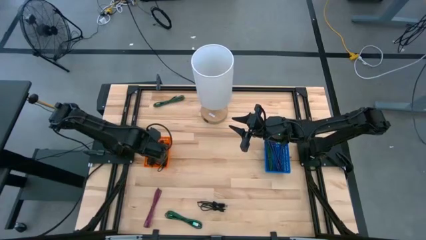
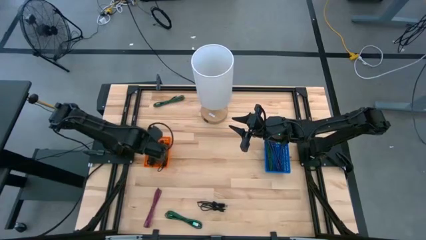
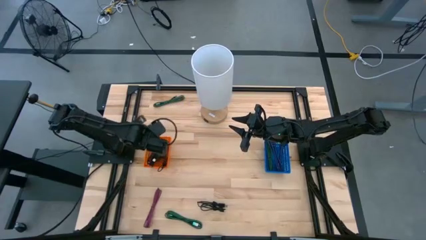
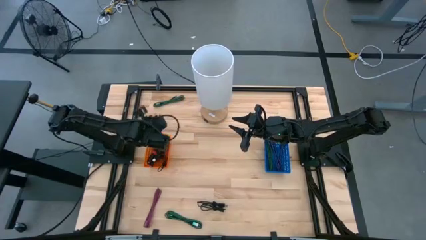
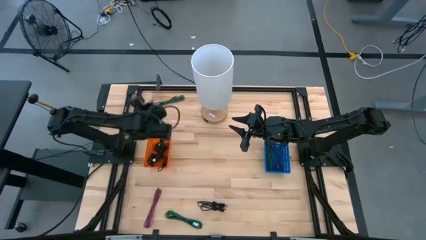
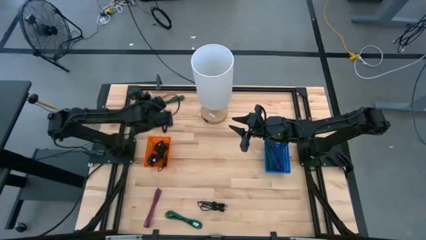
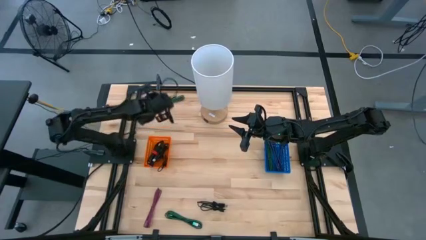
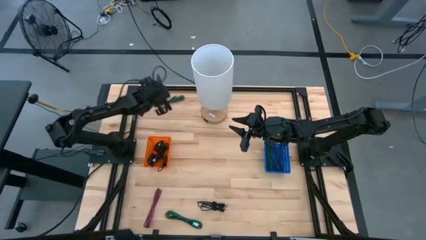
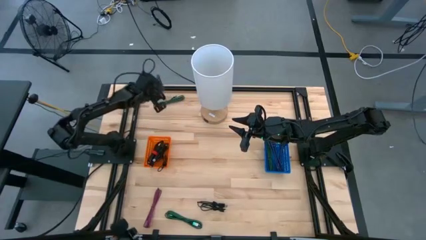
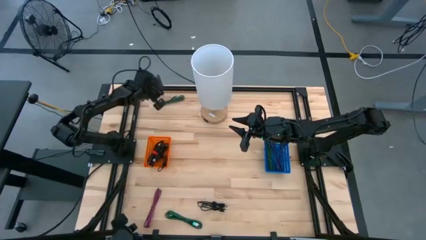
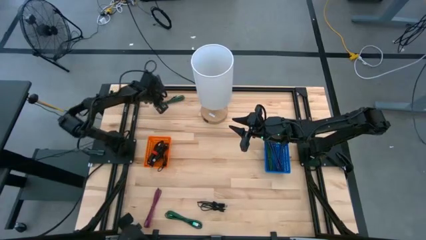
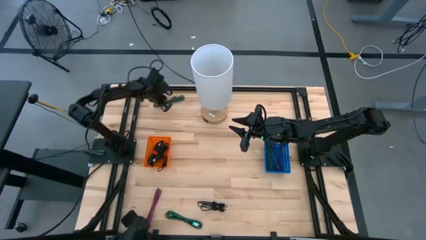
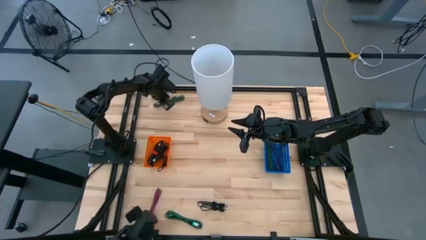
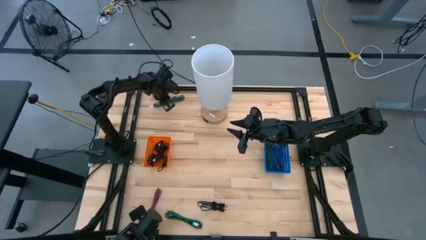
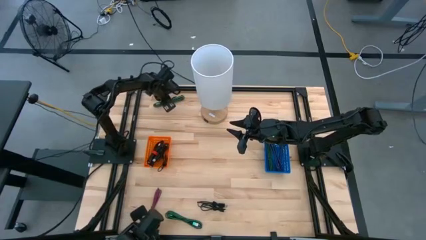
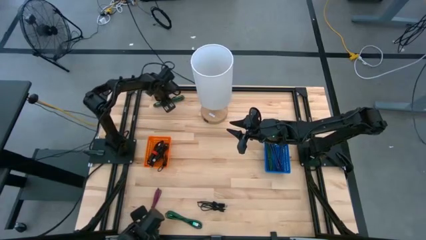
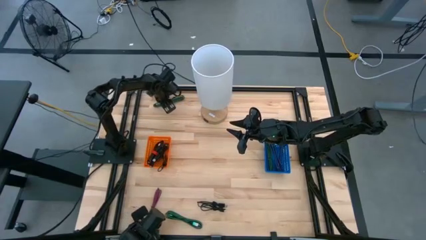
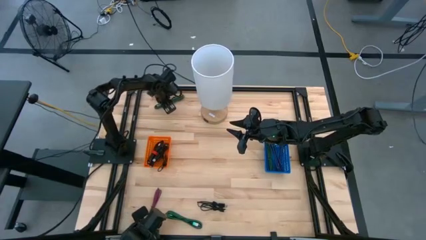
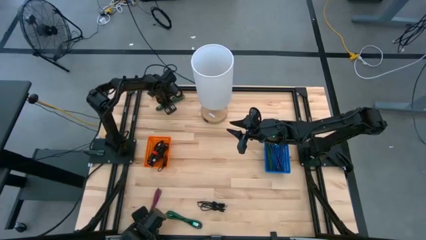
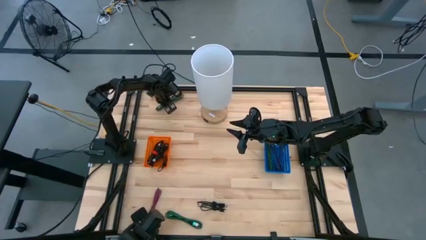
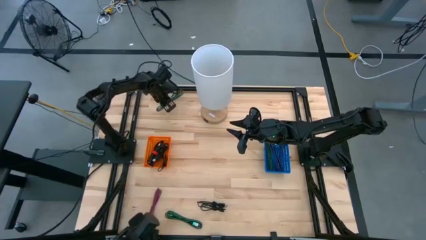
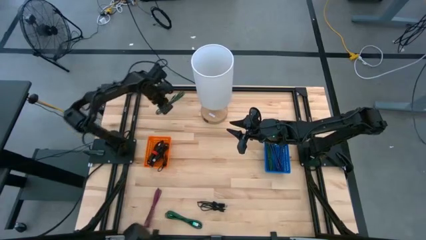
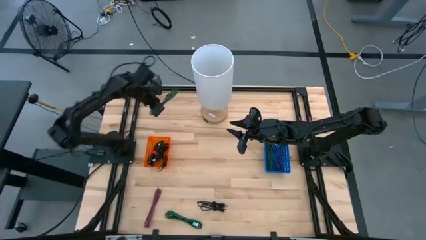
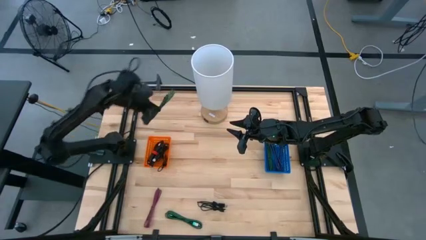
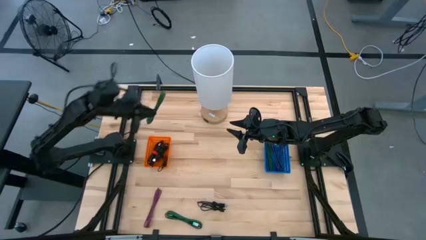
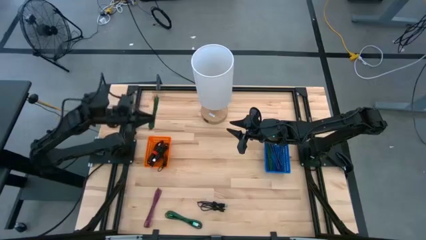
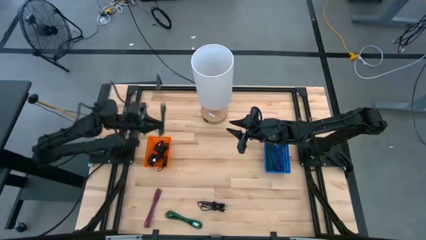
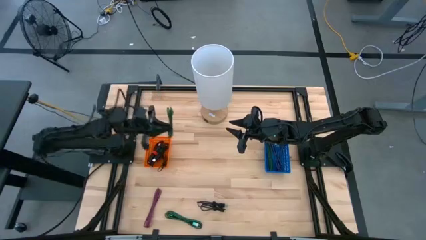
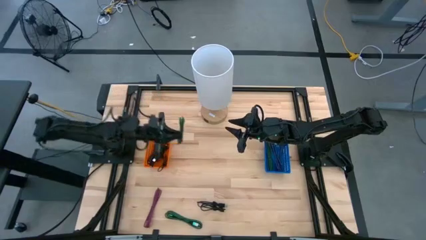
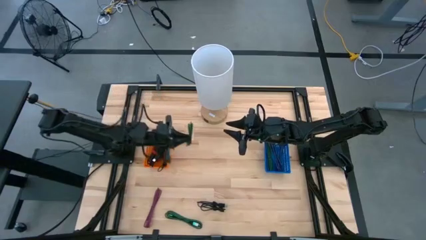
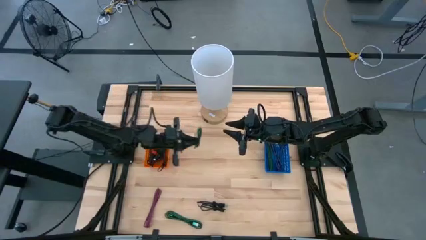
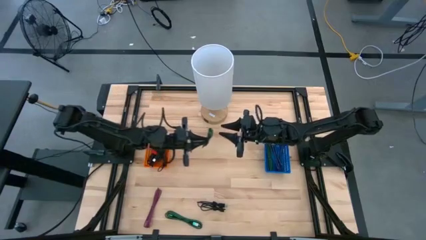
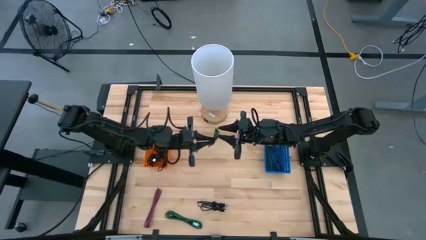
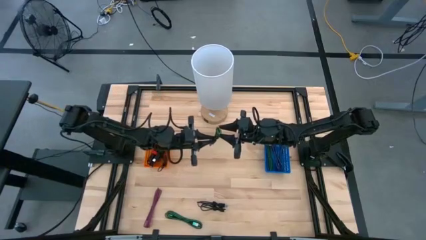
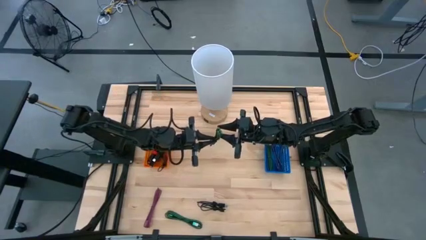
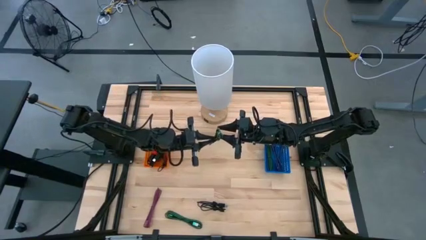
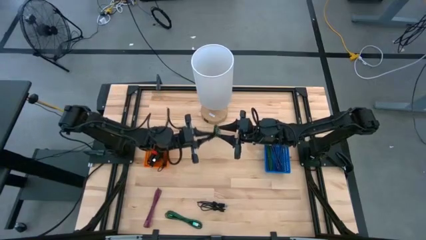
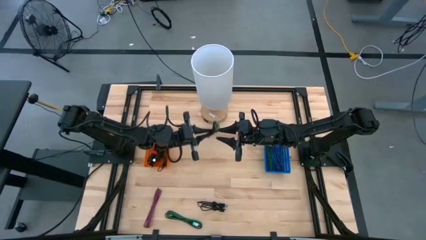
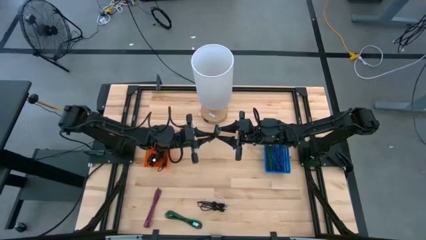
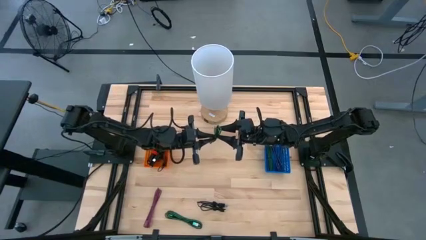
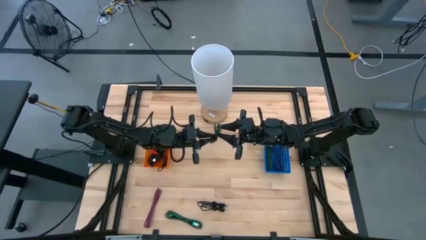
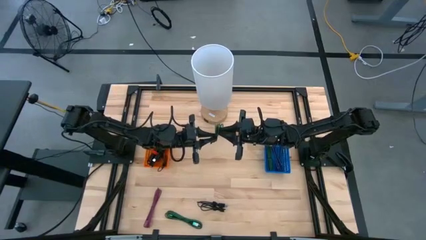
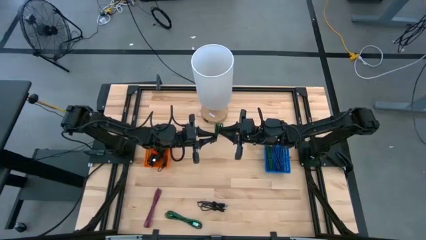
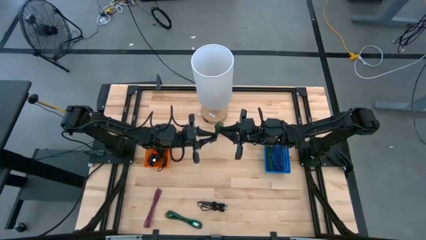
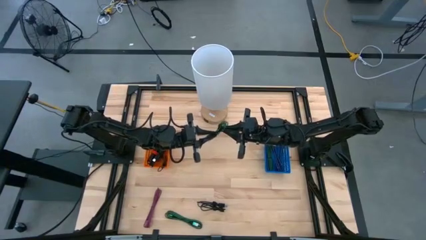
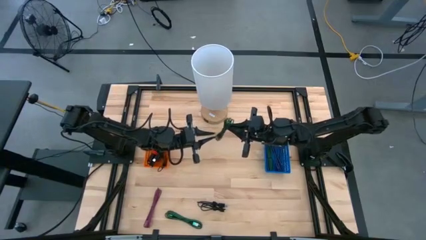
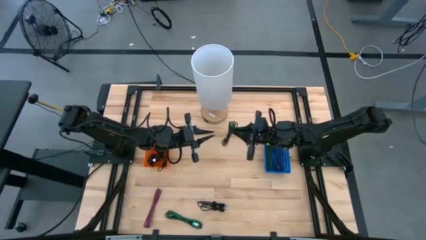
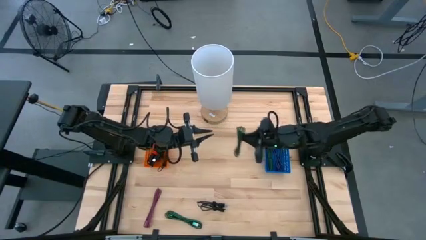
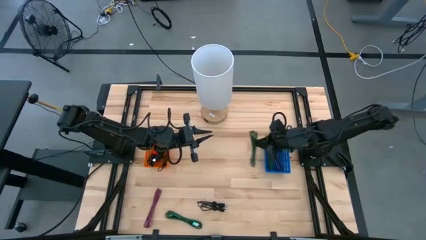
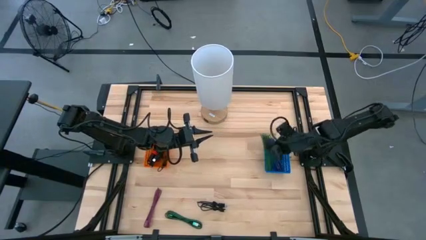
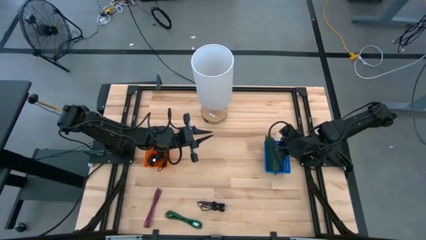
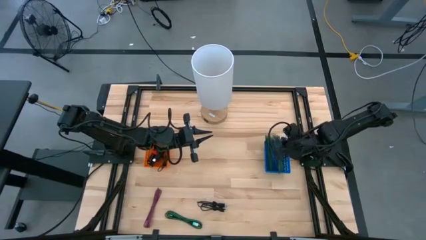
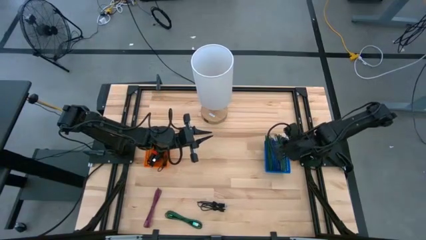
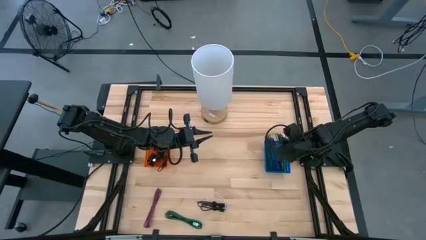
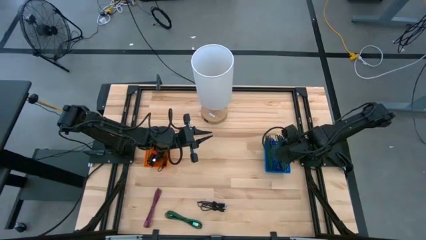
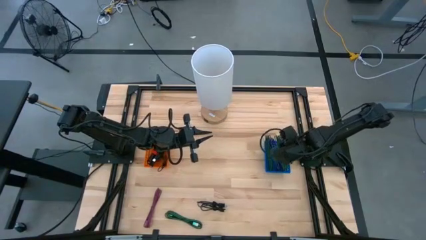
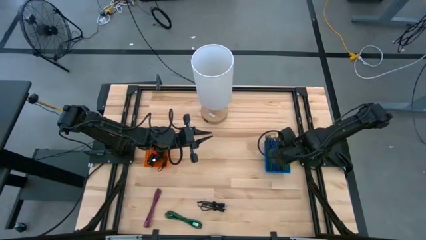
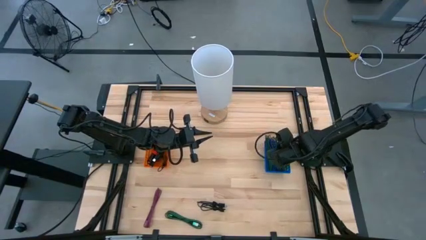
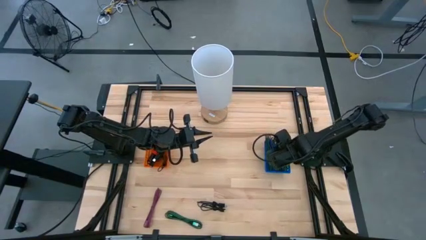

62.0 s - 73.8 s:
Task: Pick & Place USB Port
Put the green charger cable into the blue bin

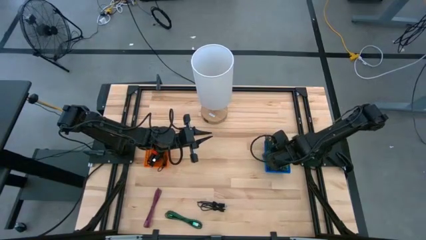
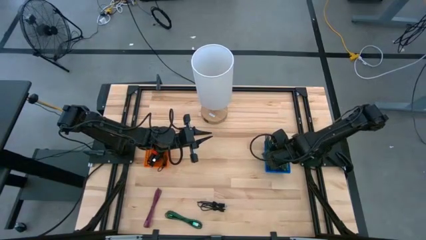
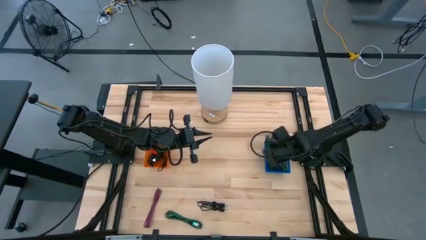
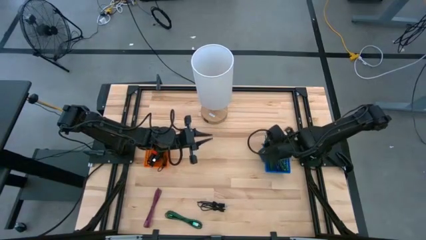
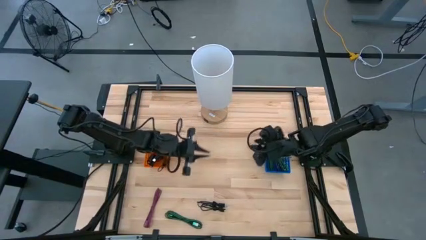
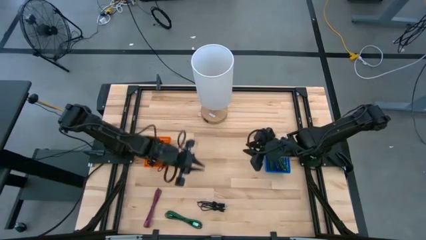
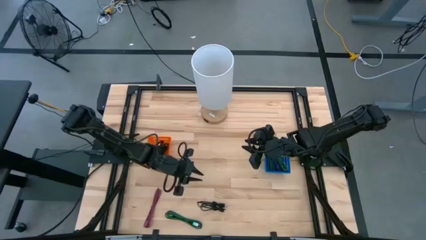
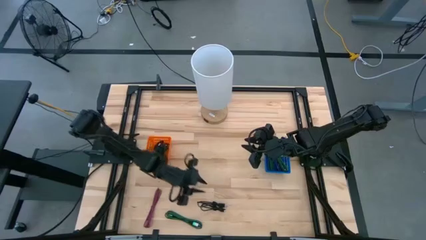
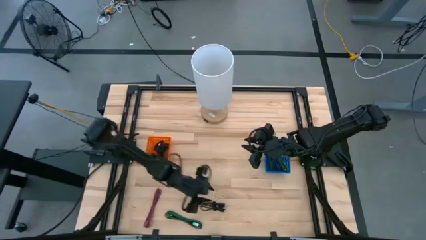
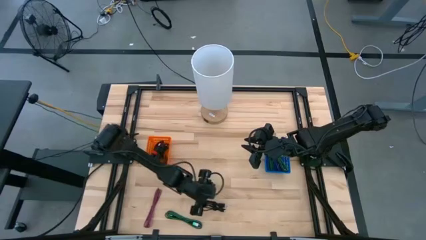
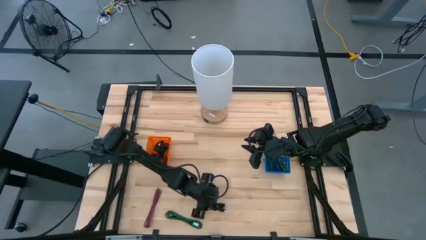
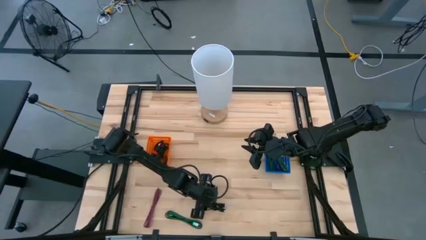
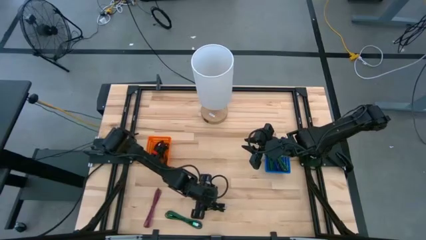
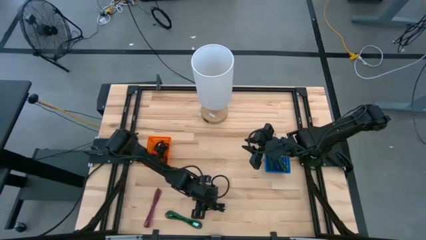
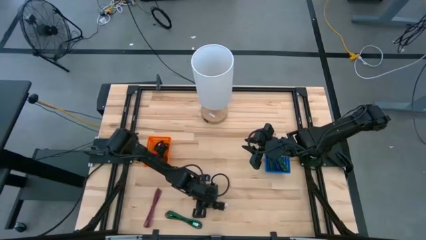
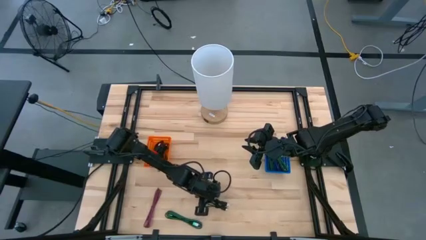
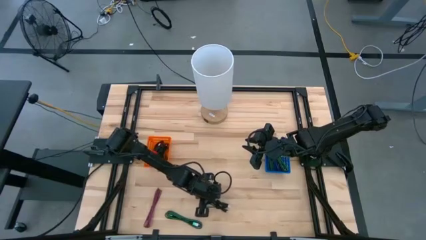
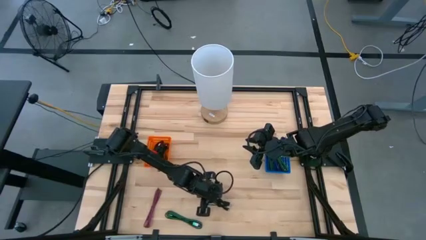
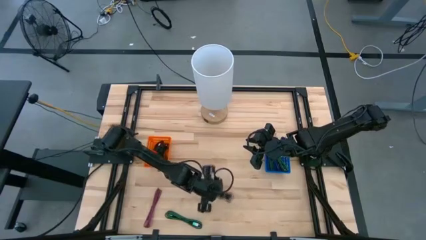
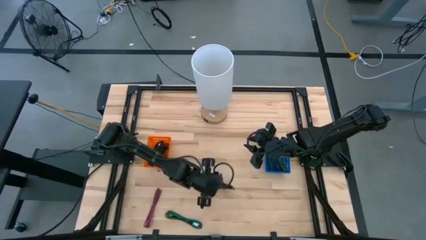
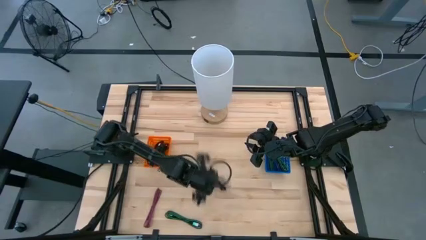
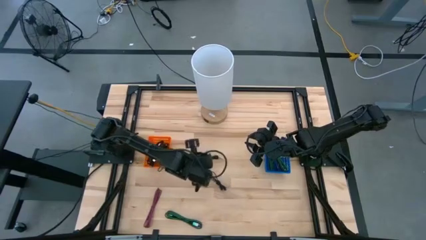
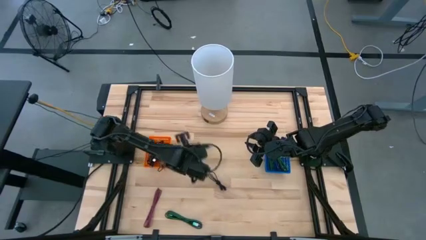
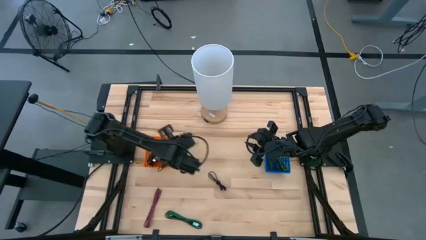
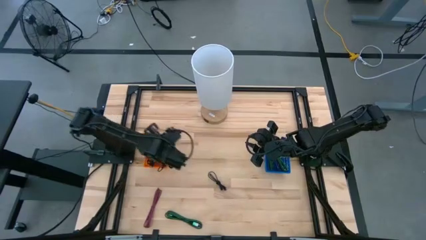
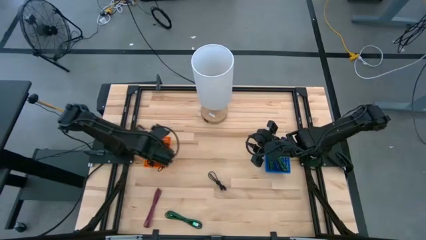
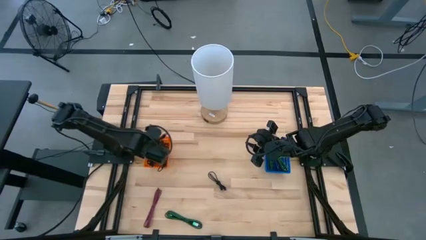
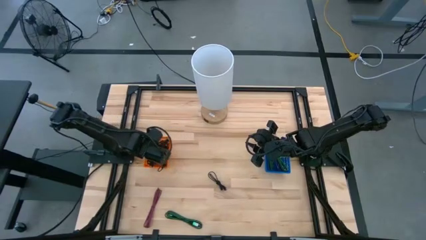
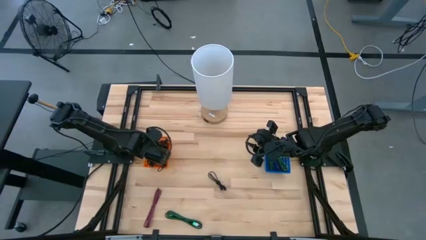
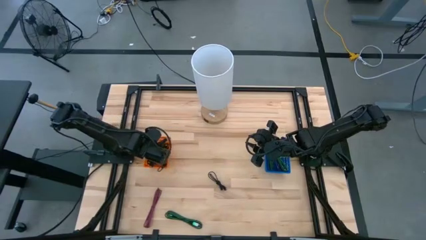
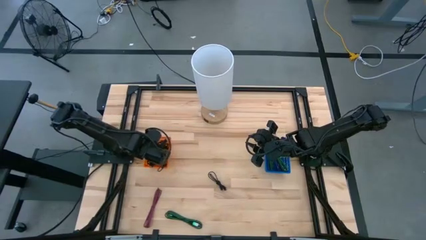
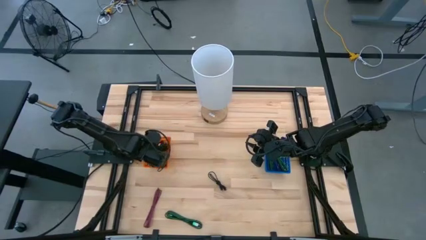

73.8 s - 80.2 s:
Put the black charger cable into the orange bin
